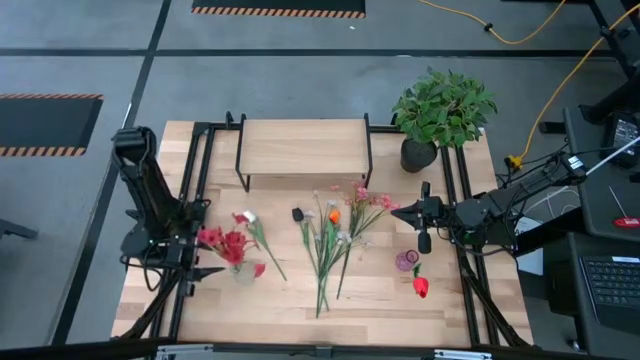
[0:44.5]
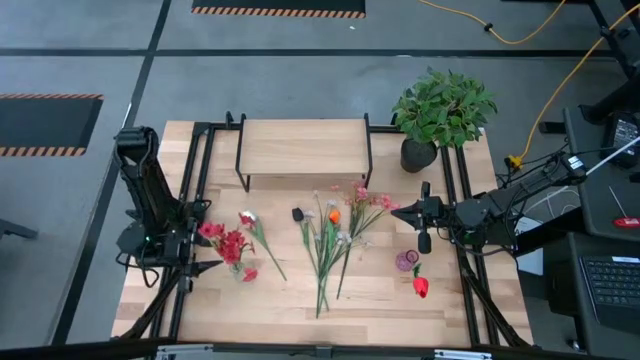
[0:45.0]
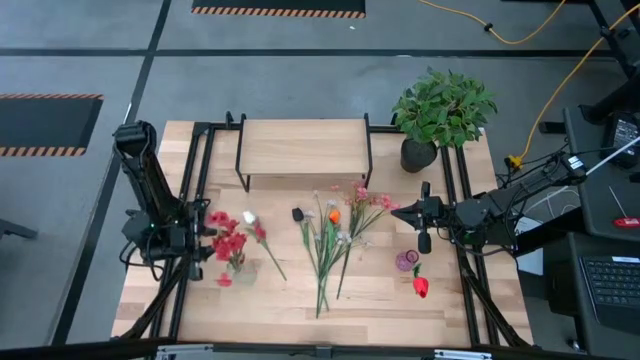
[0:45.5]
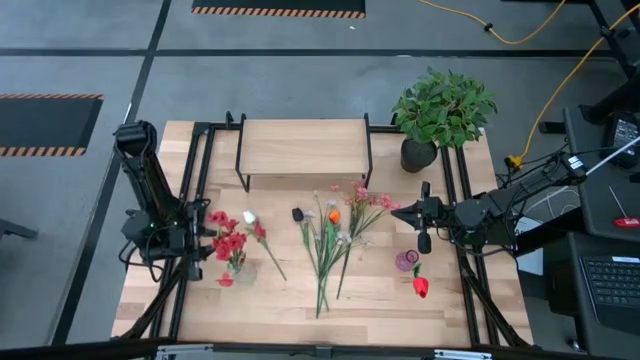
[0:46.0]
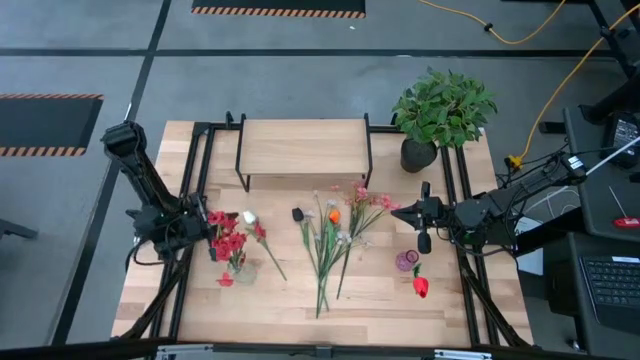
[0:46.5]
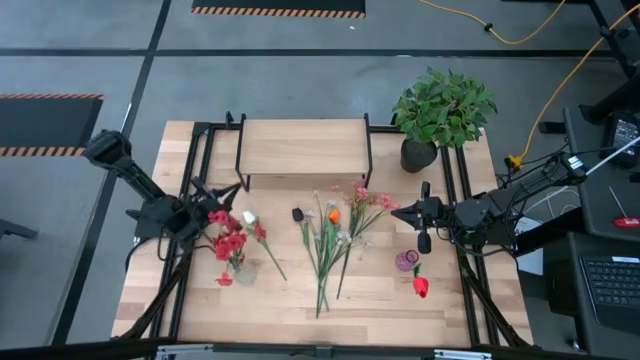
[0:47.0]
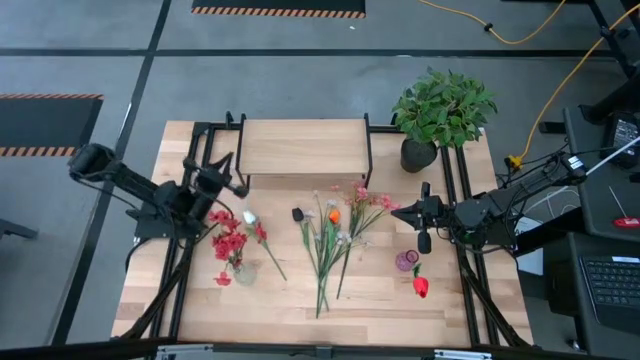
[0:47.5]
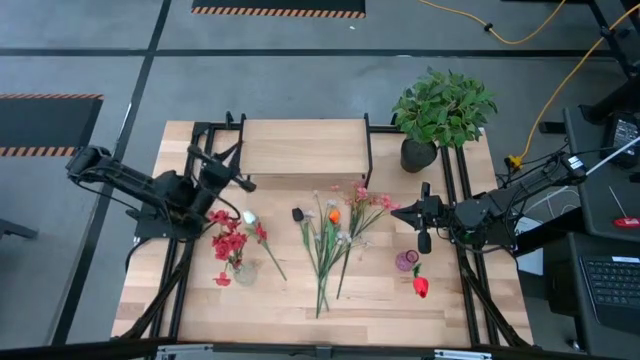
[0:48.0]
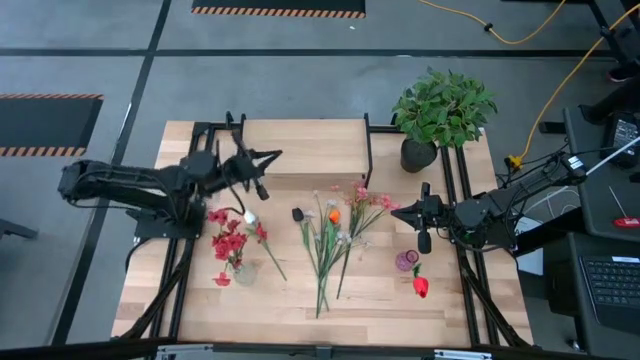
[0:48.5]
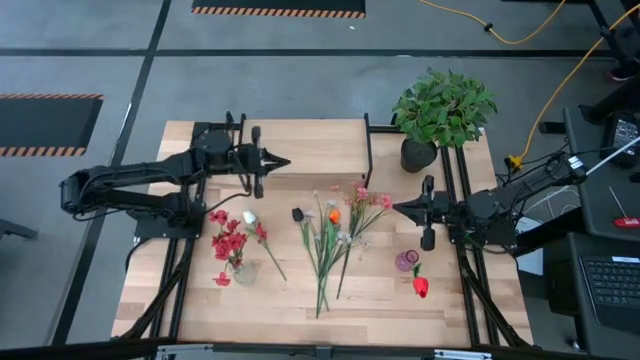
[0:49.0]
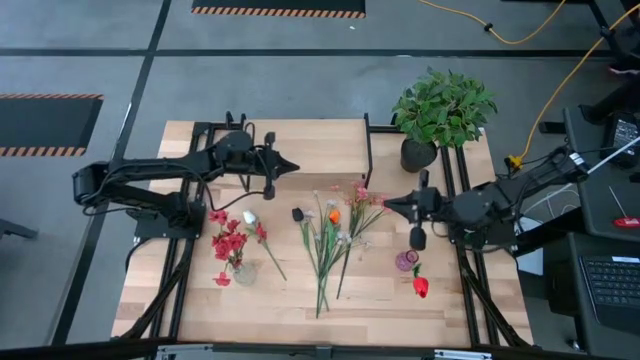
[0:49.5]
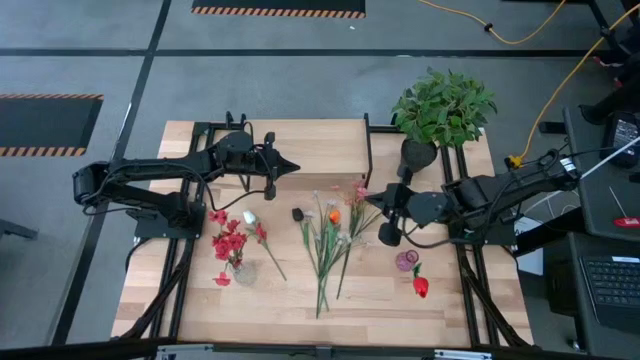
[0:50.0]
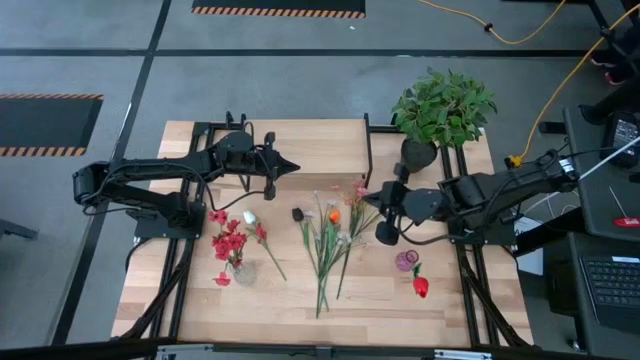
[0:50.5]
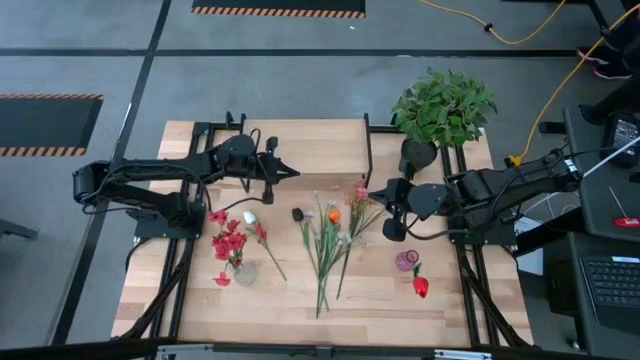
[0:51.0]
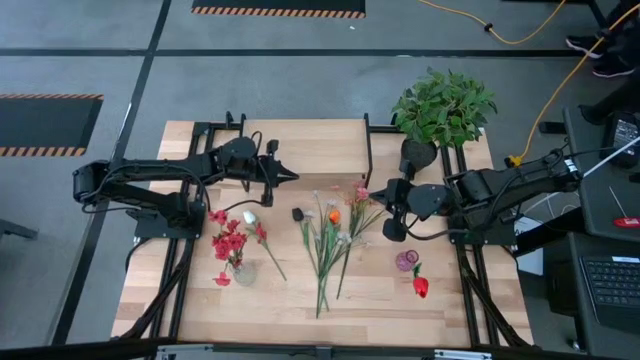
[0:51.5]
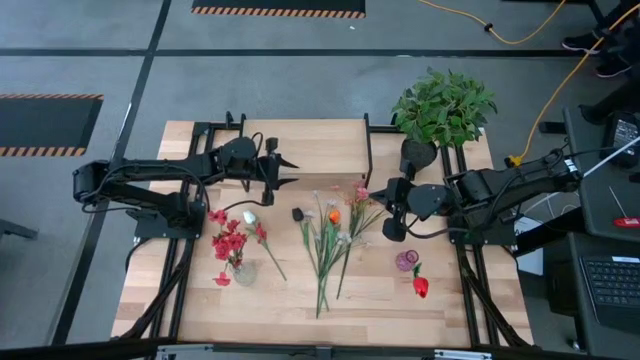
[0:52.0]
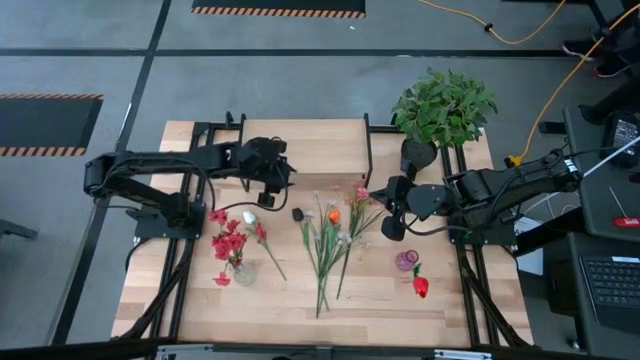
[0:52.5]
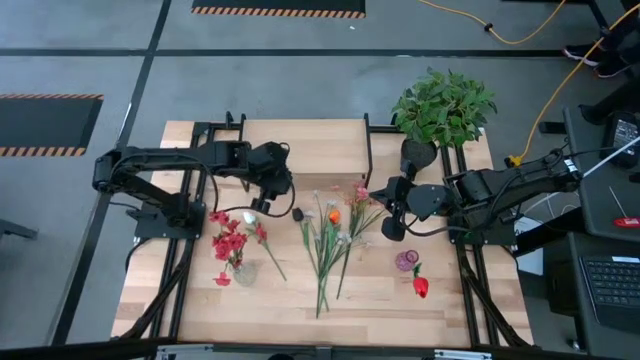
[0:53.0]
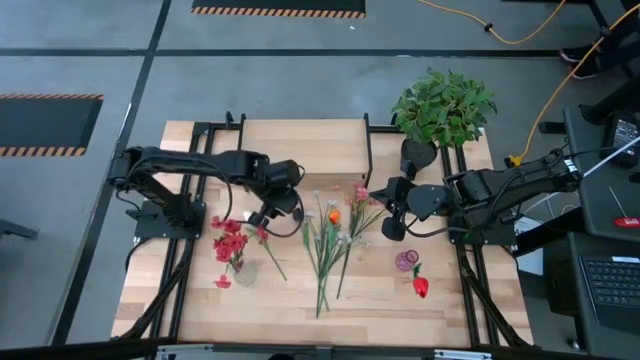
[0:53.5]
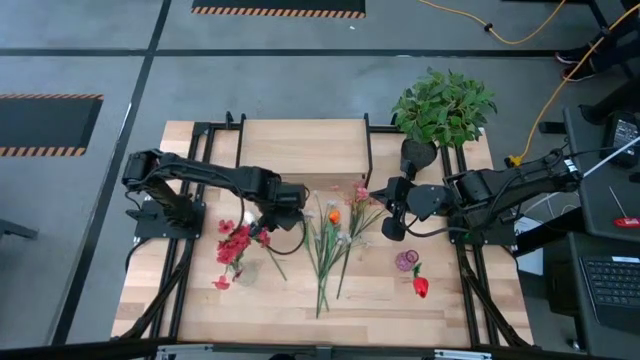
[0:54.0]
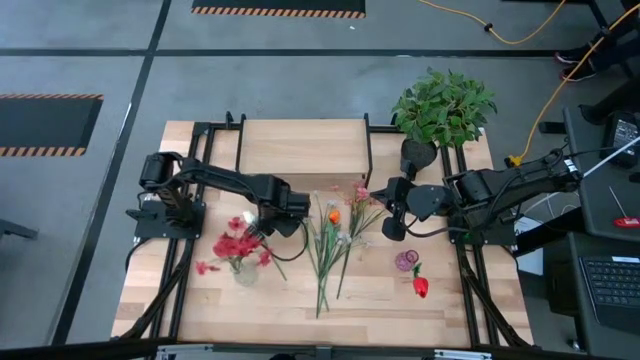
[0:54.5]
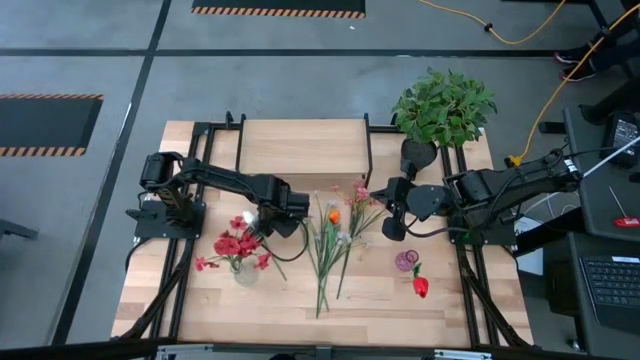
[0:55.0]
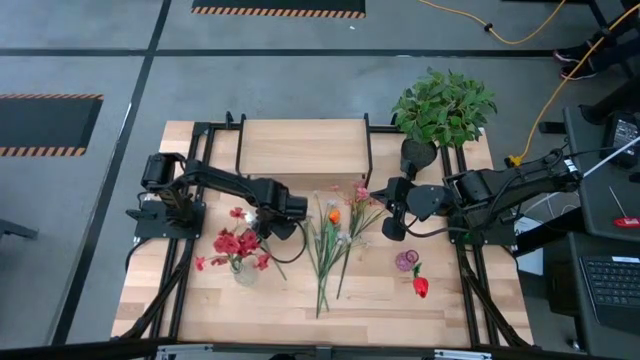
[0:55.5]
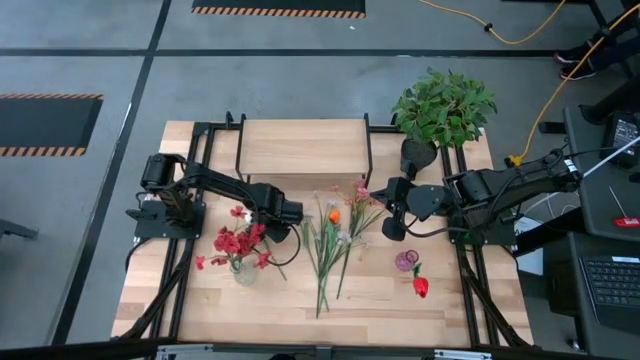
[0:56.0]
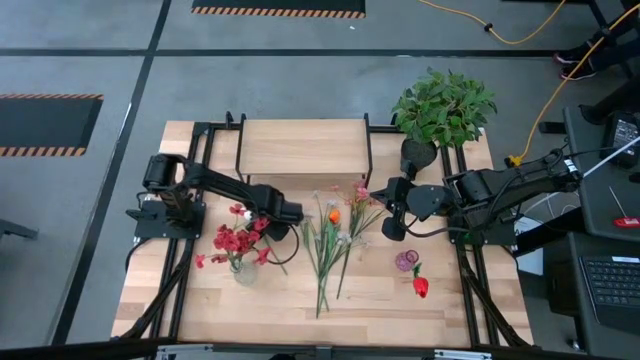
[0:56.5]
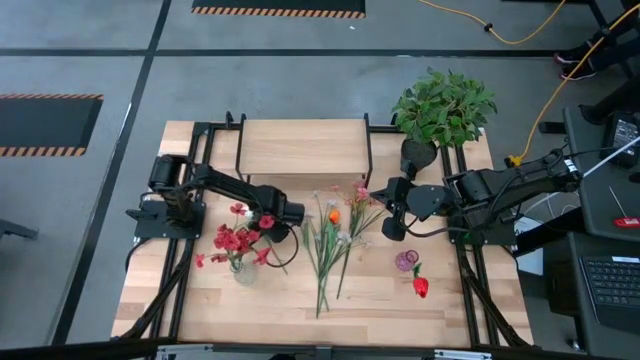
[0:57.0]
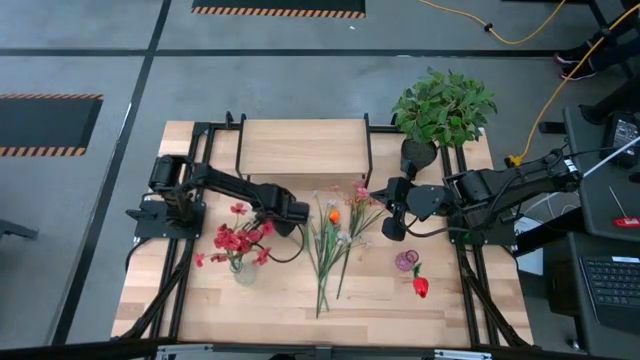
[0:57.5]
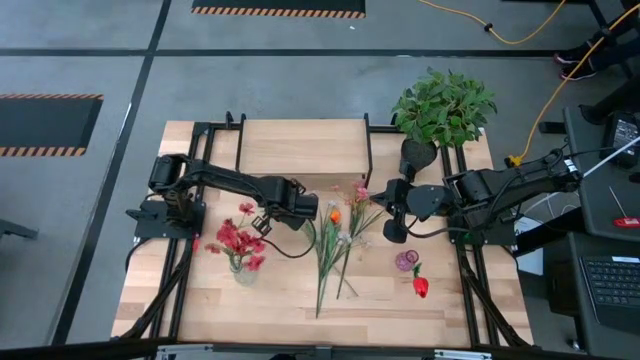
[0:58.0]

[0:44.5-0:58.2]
Task: Pick and place flowers into a vace then onto a shelf
Put the white flower into the pink vase
